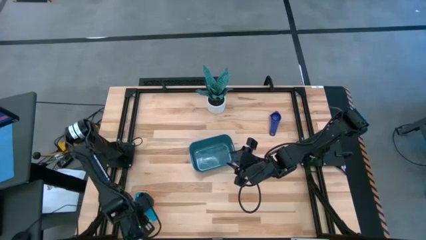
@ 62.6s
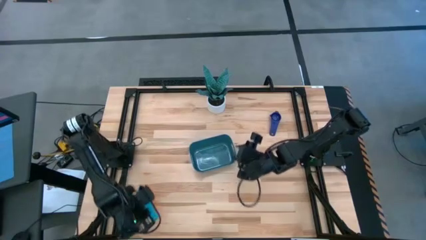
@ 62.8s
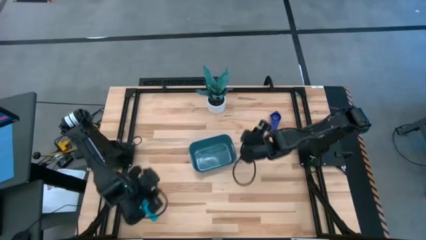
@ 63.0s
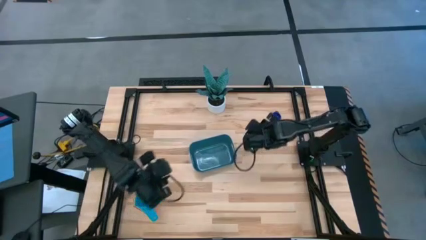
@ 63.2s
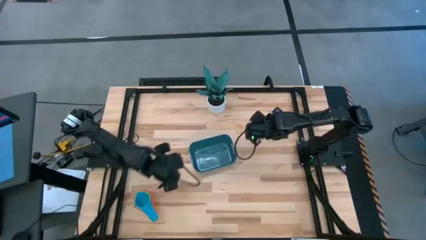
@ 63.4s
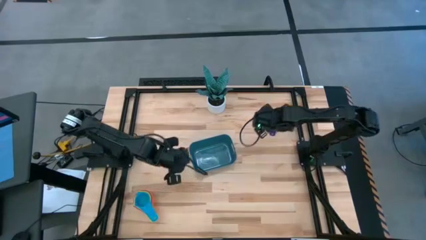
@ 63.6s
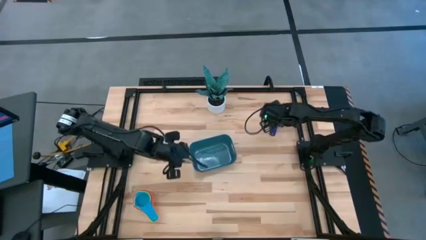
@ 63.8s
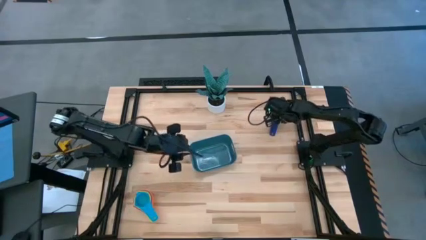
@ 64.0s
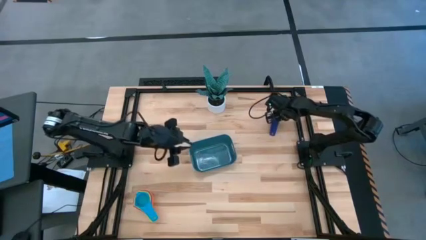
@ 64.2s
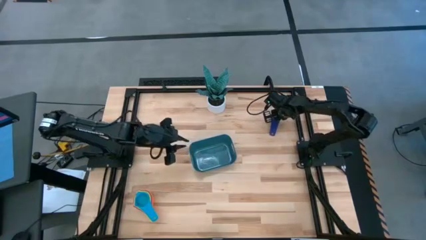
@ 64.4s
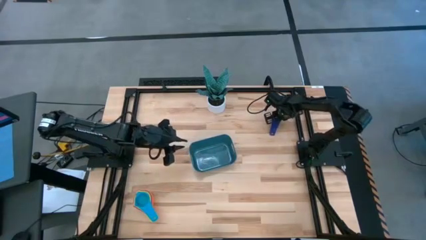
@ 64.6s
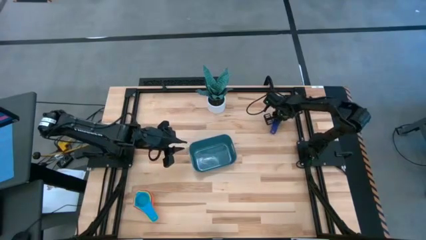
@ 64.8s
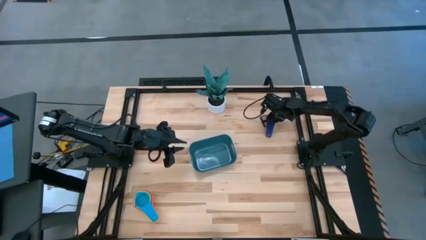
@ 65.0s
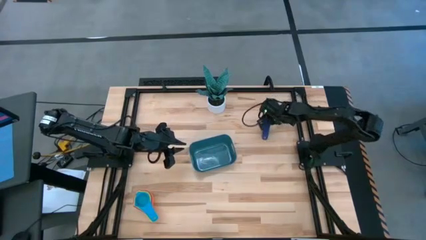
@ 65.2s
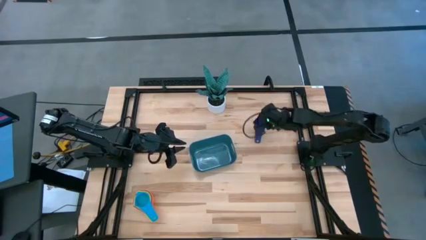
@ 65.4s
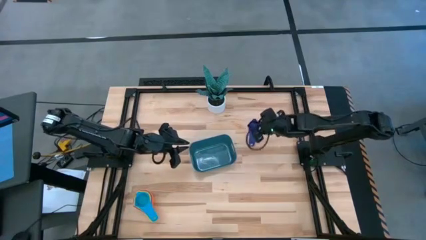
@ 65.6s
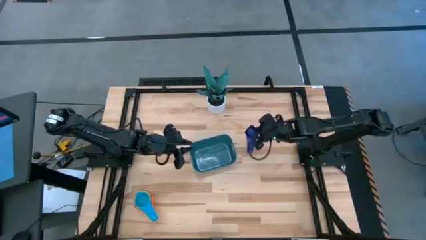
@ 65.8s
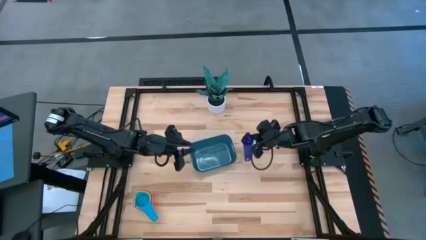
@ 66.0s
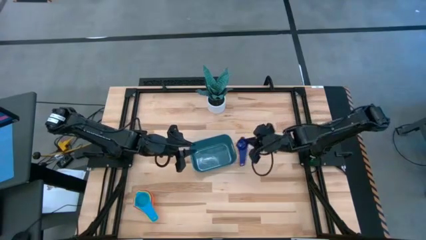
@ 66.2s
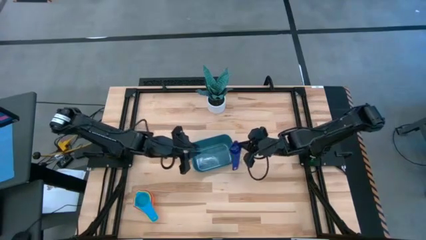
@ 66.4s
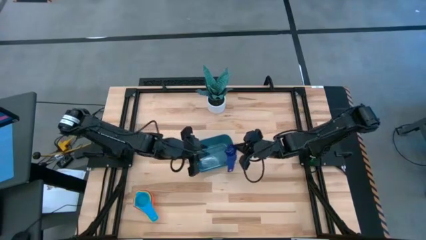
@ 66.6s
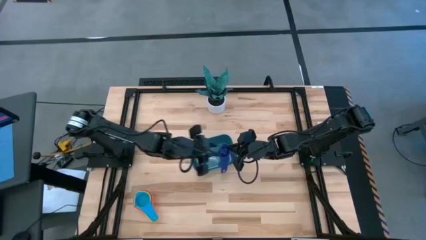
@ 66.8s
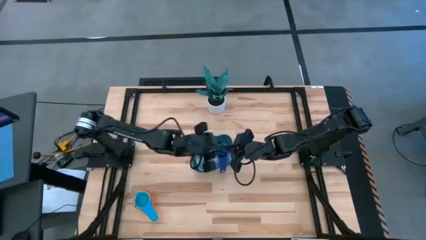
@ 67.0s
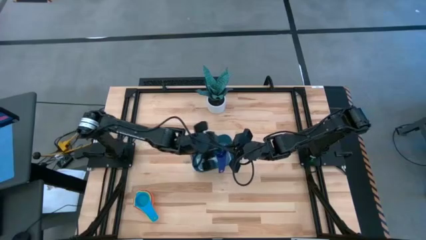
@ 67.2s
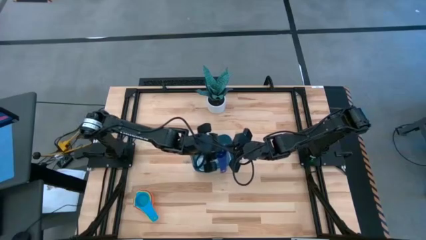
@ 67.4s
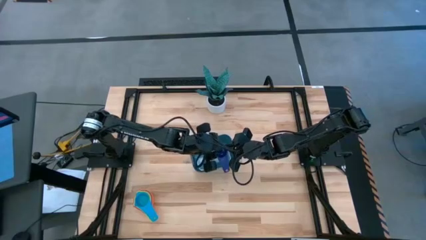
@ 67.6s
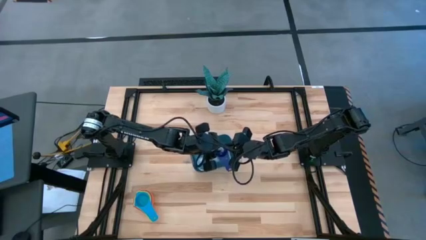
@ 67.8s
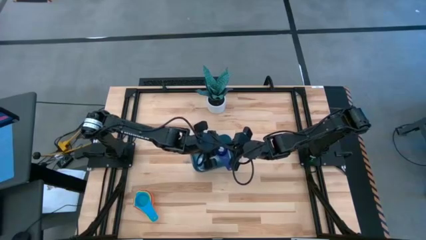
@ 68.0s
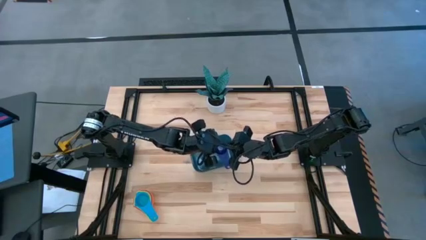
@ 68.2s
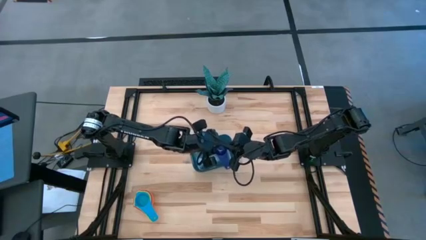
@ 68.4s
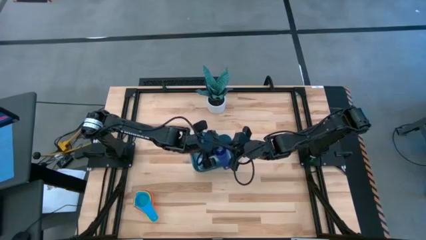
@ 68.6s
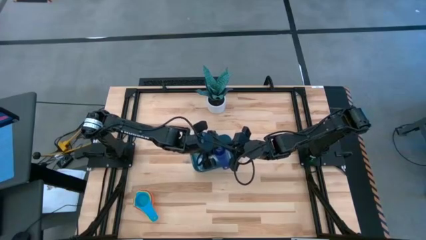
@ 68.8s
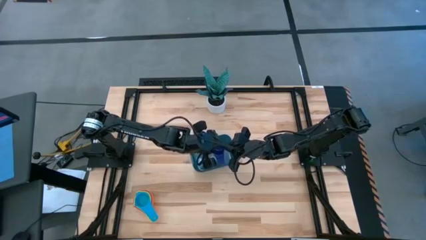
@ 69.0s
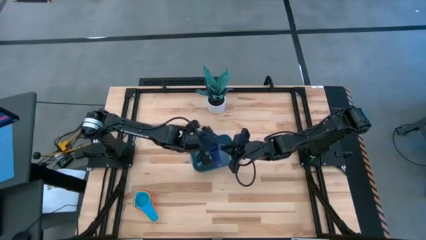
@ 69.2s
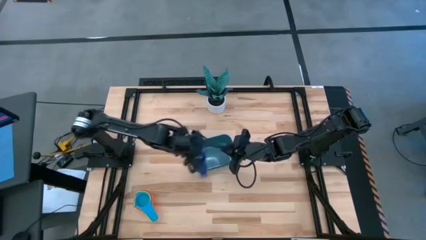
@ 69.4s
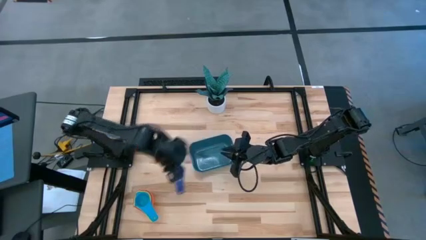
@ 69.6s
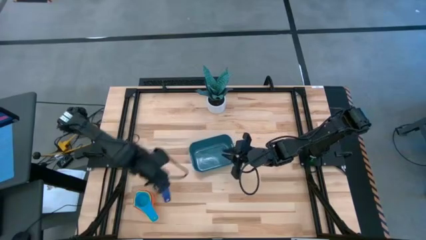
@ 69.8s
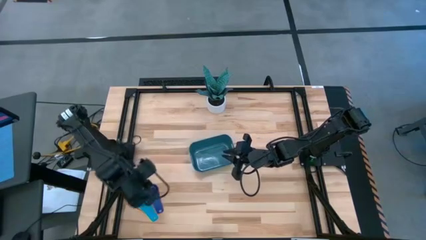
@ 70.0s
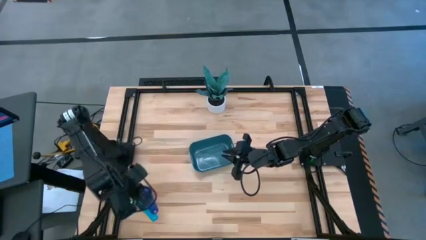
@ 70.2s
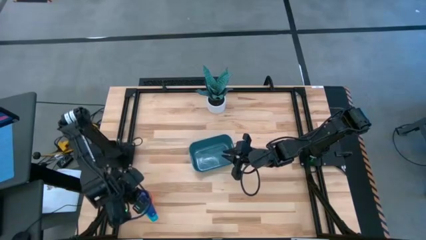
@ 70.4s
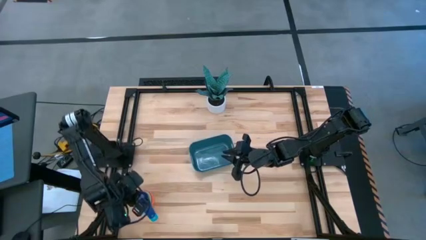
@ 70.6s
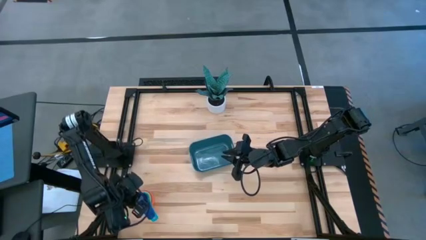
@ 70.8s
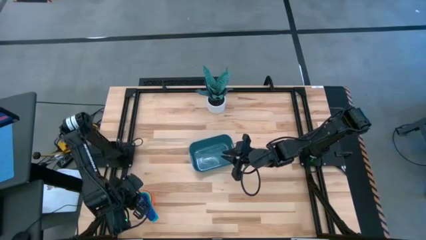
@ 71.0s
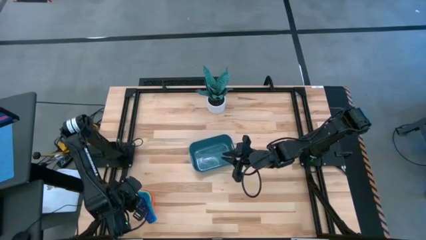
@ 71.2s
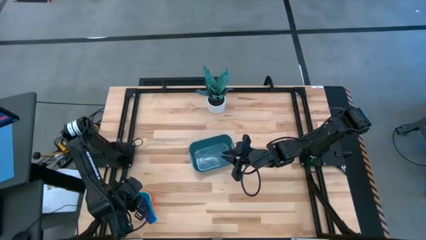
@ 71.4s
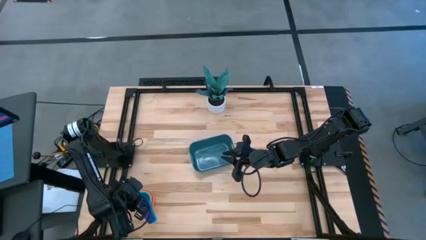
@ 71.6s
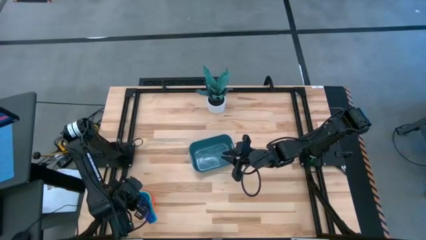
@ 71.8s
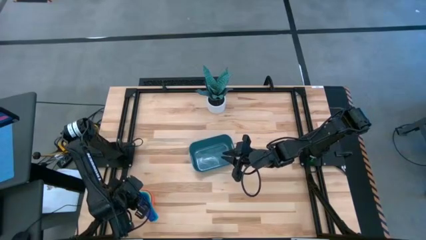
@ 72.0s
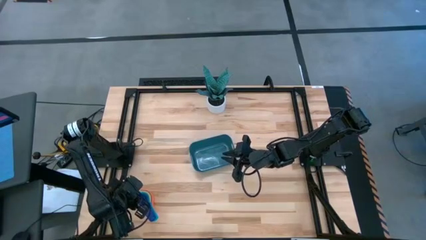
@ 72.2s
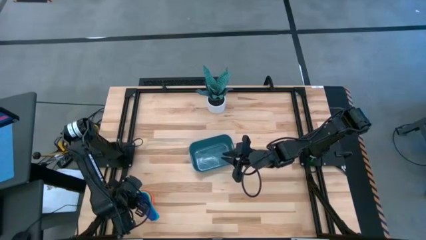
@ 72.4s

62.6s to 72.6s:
Task: Nest measuring cups in basket
Stack the dark blue measuring cup on top of the light blue measuring cup

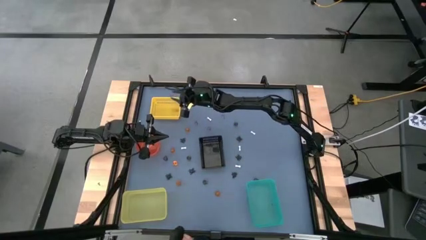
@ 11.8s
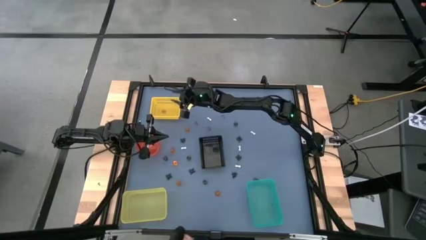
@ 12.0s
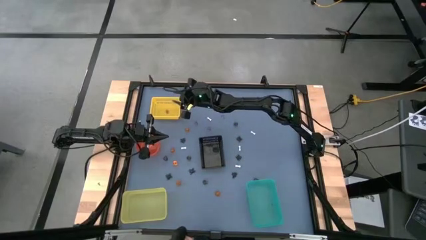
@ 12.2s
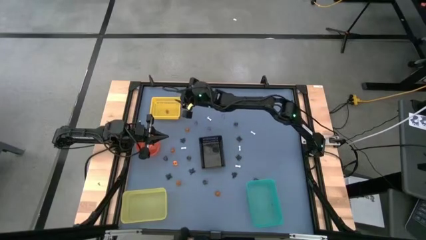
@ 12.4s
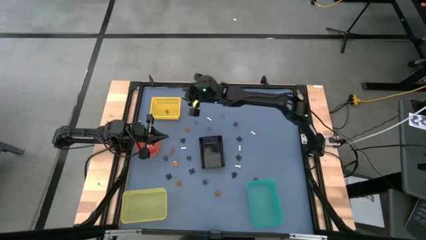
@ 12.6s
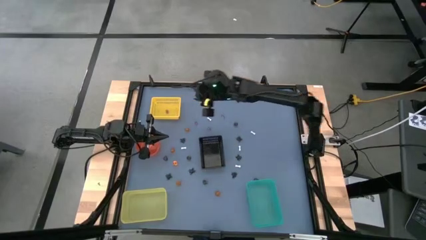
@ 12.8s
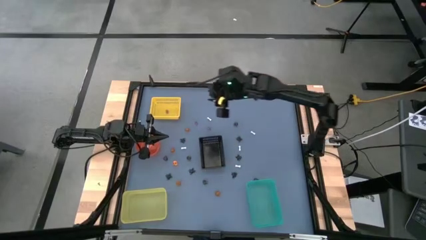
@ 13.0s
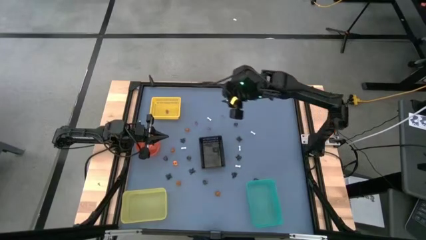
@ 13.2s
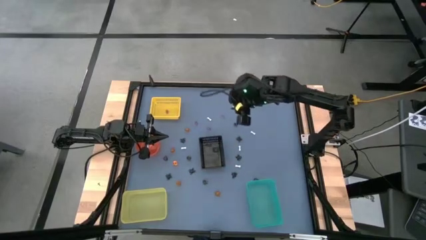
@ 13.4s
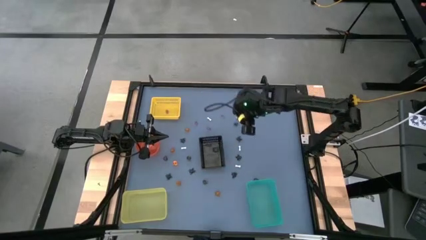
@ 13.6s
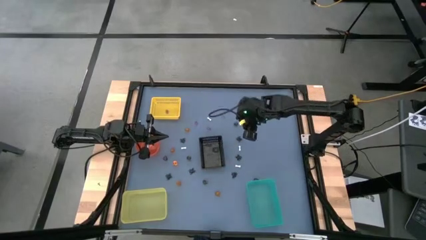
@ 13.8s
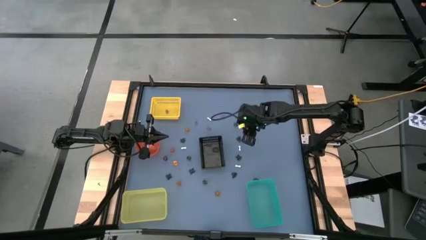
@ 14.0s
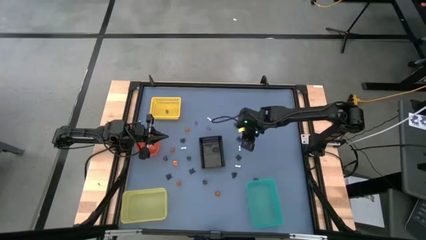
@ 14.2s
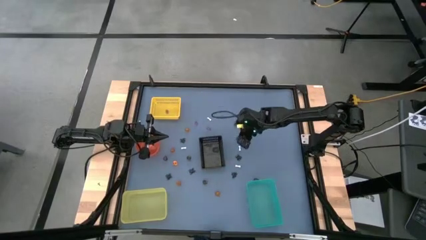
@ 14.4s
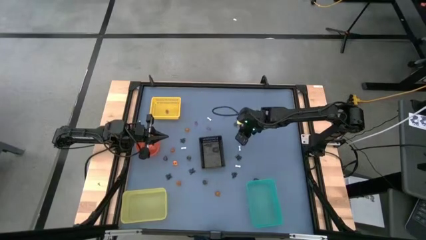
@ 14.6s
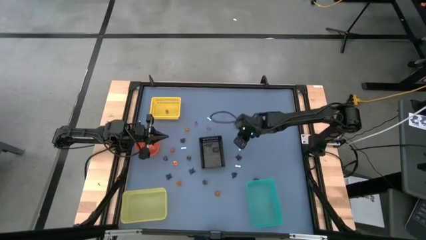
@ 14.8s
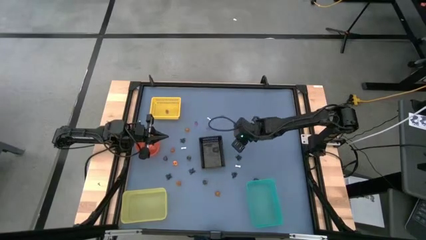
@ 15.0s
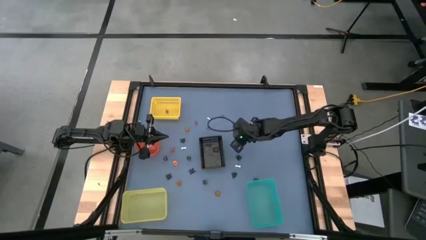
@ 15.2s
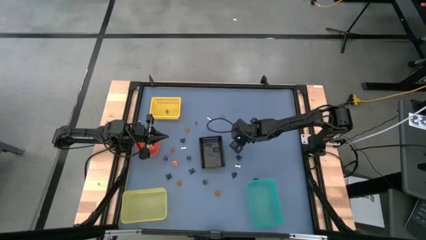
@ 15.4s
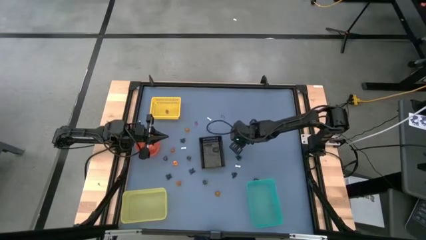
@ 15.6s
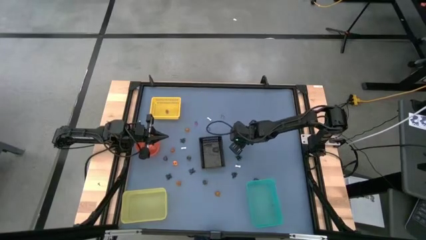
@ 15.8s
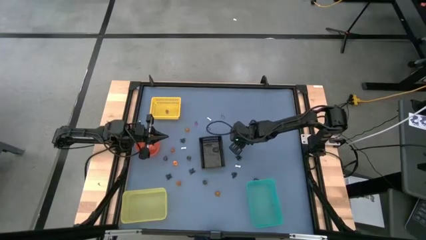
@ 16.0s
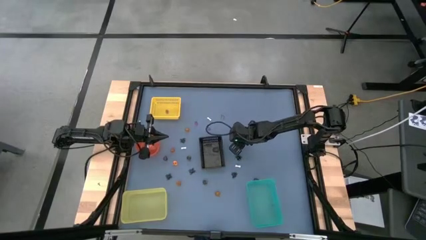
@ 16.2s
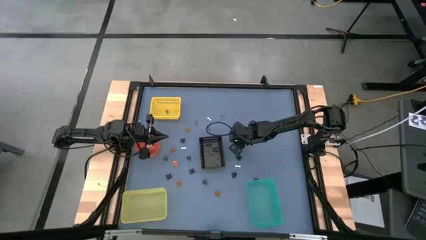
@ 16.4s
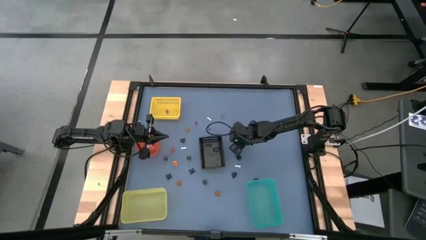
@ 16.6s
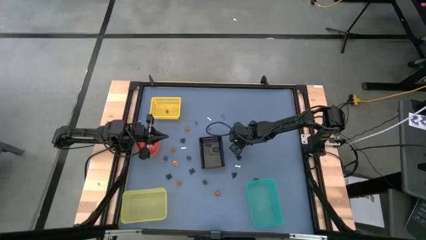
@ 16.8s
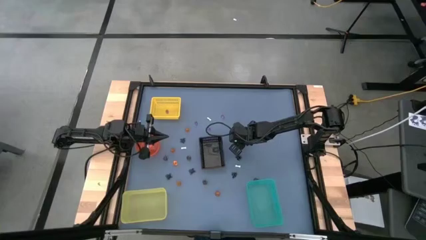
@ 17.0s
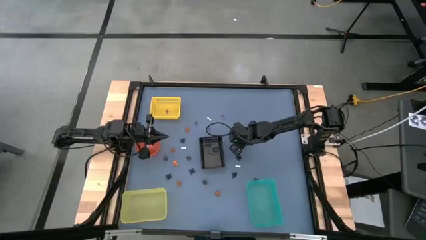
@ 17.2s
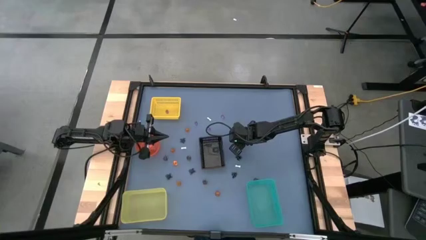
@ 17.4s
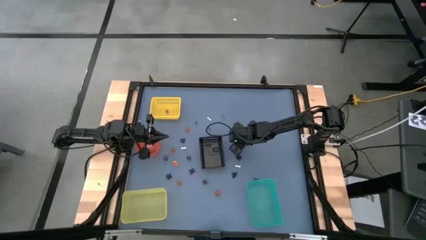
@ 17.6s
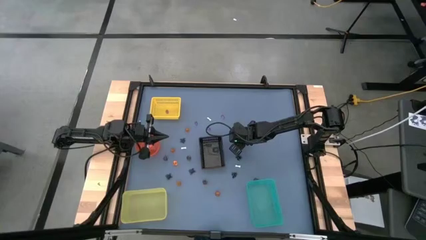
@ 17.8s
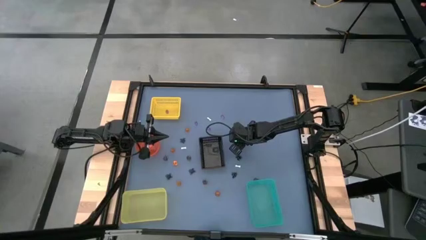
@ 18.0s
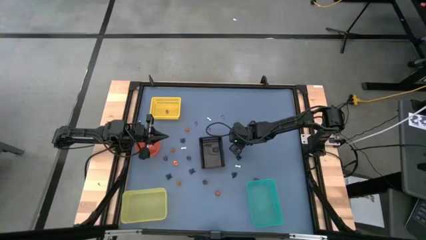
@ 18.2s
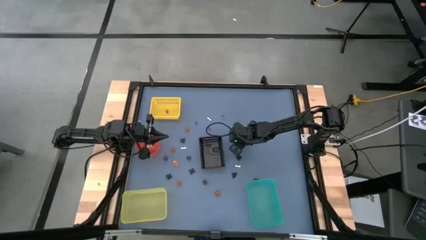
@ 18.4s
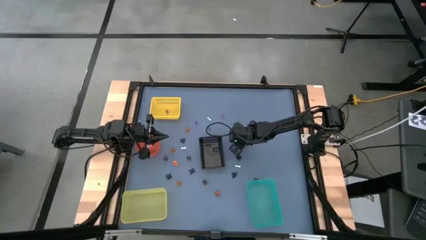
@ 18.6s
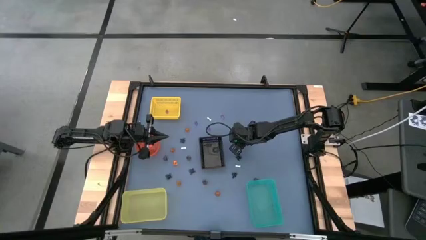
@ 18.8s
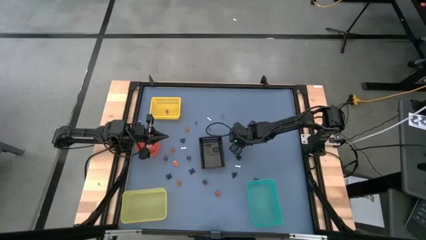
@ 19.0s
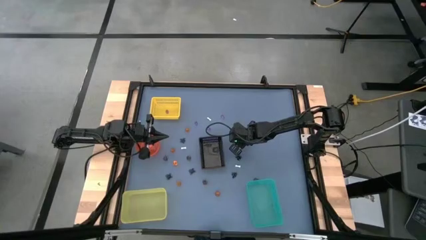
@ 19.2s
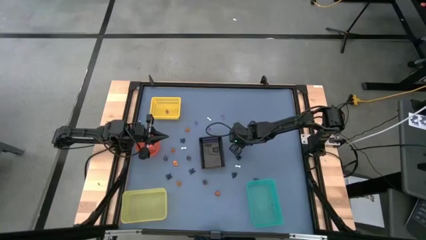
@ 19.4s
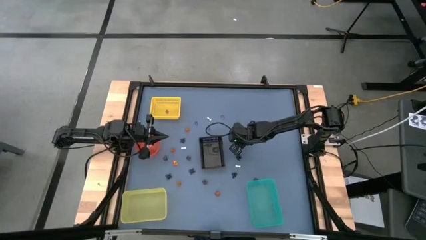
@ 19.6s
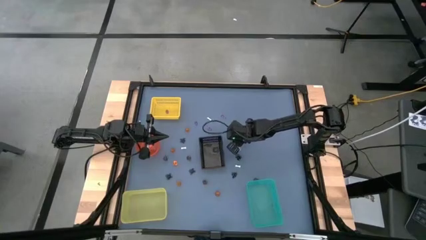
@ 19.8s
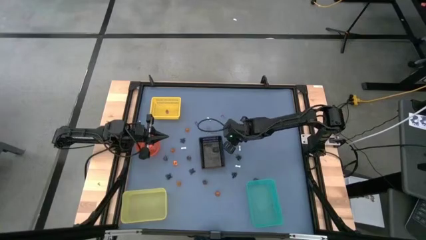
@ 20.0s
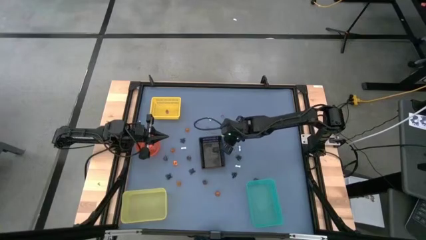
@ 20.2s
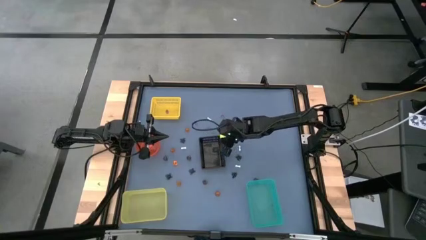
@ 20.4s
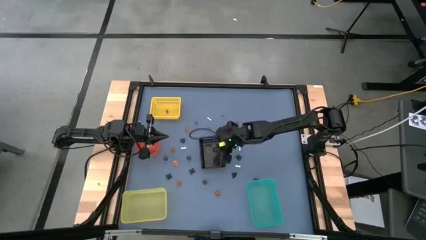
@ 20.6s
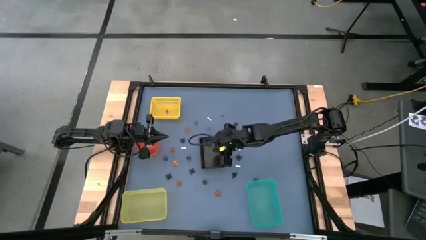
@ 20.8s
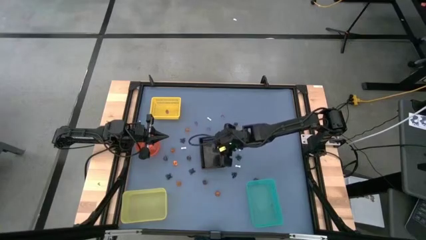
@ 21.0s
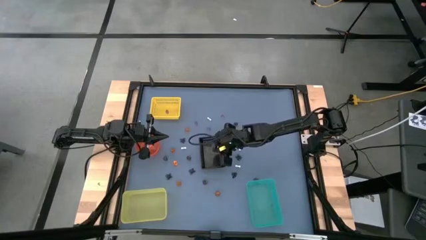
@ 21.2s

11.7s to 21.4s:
Task: Sort Halloween decoration
Put the black spider toy into the black bin
